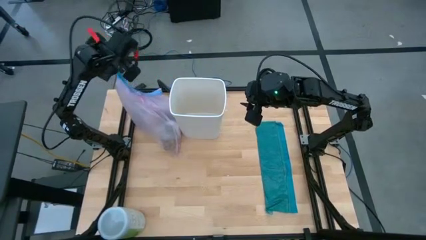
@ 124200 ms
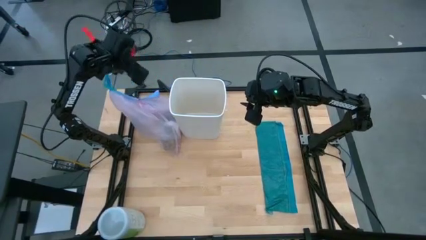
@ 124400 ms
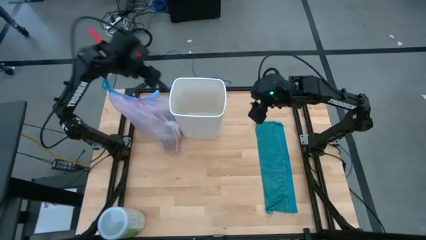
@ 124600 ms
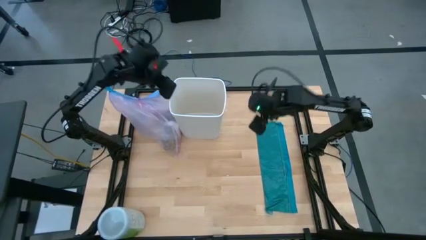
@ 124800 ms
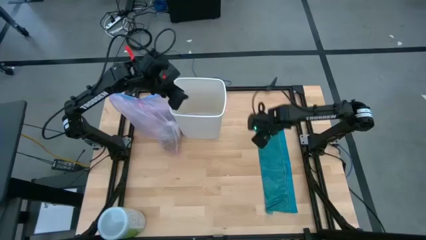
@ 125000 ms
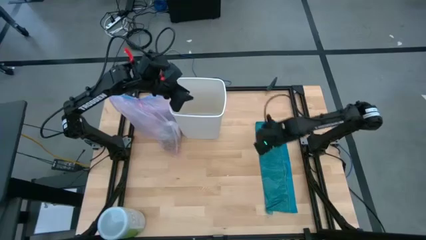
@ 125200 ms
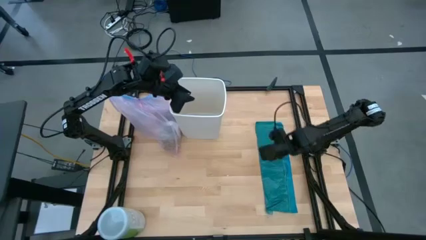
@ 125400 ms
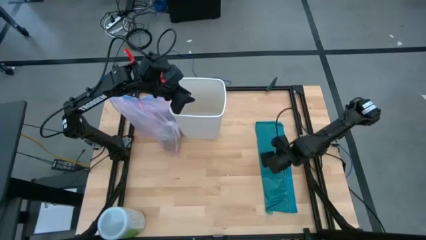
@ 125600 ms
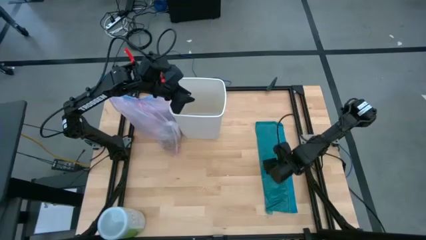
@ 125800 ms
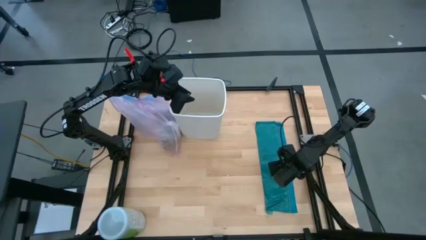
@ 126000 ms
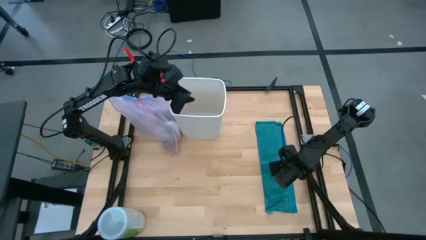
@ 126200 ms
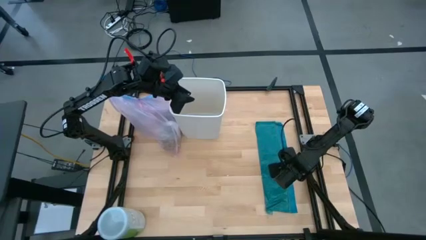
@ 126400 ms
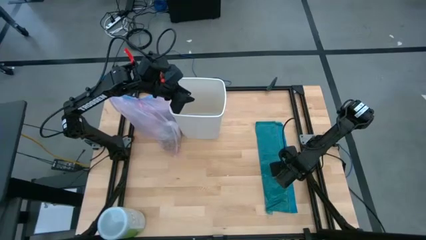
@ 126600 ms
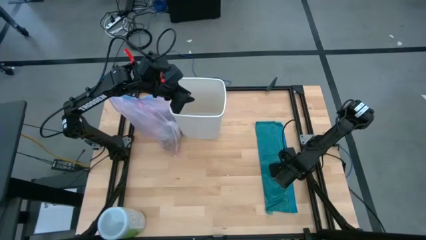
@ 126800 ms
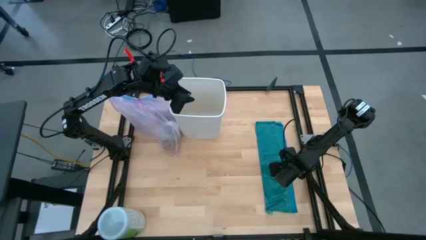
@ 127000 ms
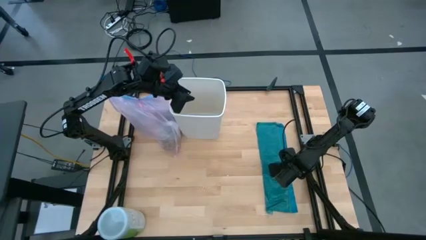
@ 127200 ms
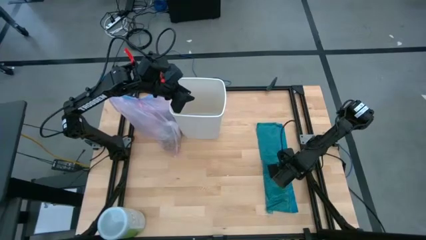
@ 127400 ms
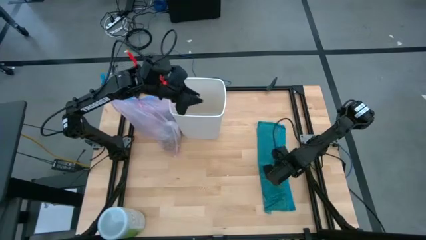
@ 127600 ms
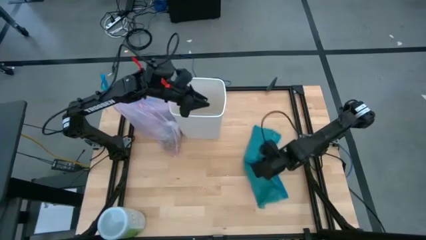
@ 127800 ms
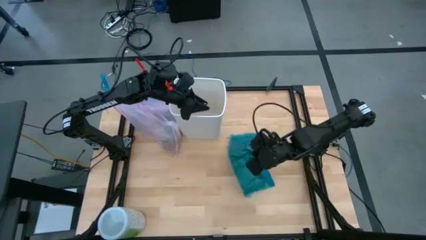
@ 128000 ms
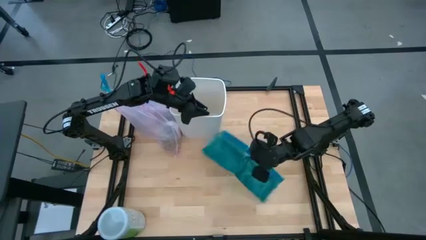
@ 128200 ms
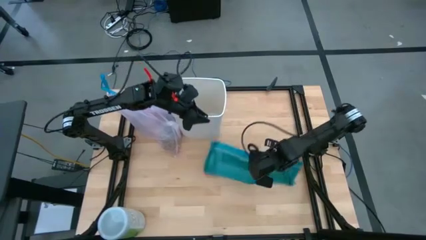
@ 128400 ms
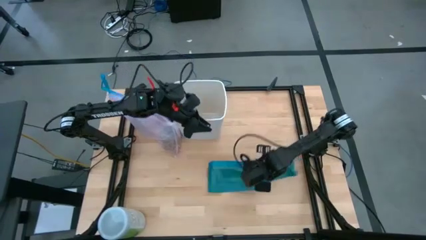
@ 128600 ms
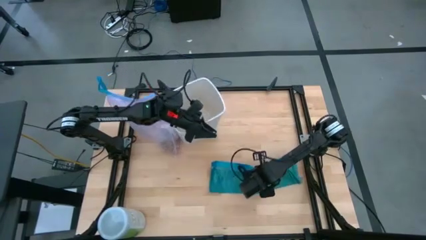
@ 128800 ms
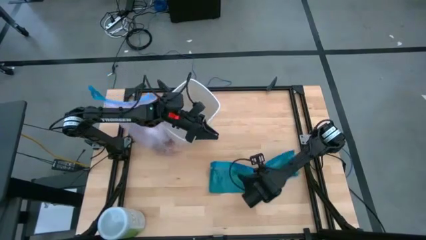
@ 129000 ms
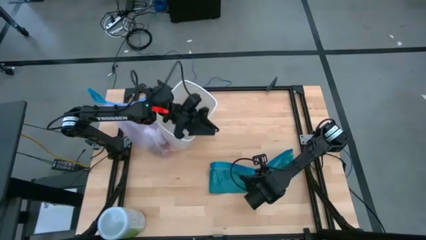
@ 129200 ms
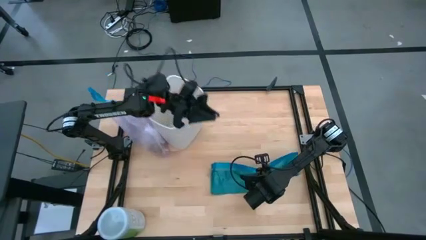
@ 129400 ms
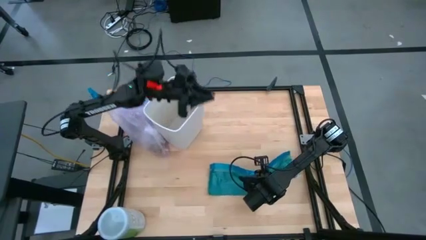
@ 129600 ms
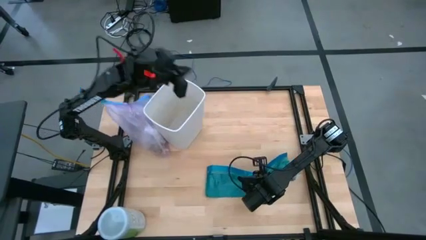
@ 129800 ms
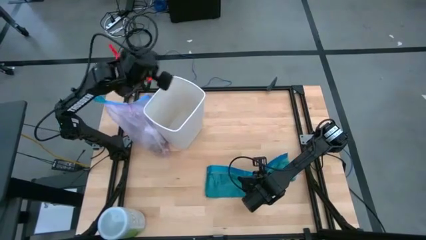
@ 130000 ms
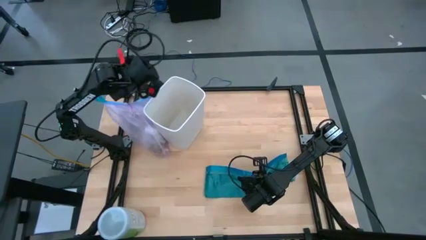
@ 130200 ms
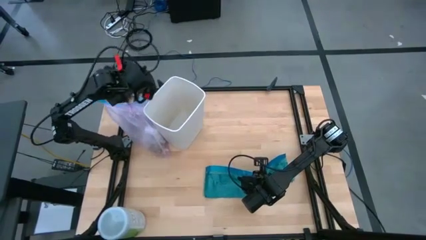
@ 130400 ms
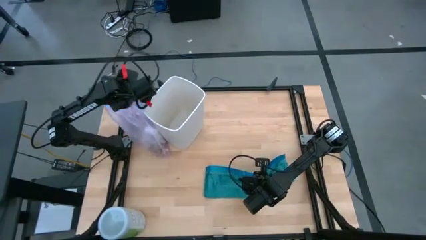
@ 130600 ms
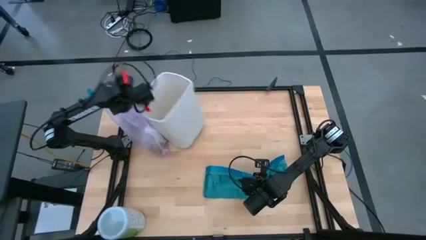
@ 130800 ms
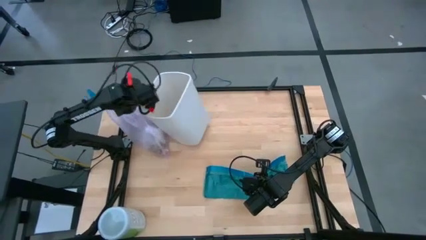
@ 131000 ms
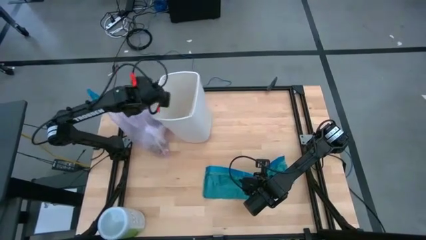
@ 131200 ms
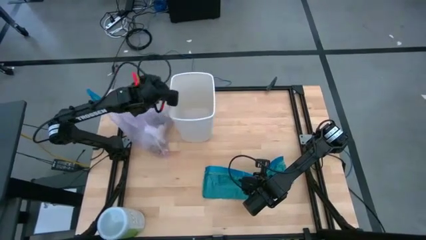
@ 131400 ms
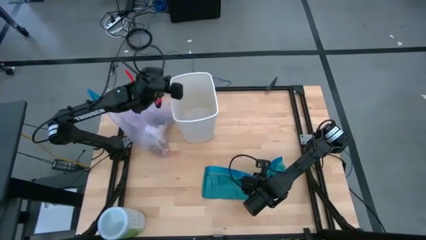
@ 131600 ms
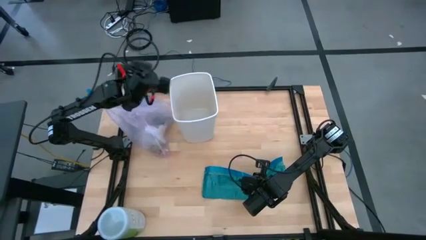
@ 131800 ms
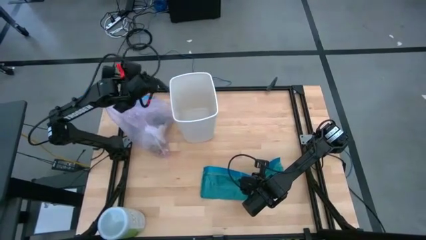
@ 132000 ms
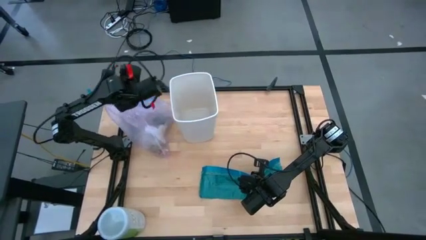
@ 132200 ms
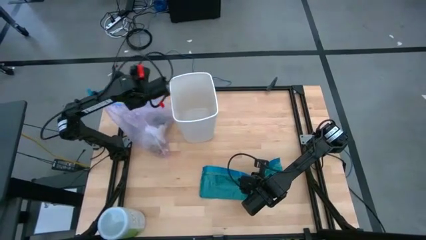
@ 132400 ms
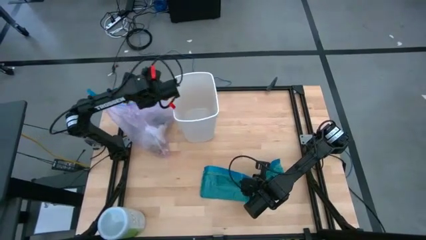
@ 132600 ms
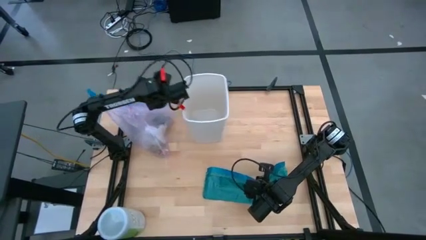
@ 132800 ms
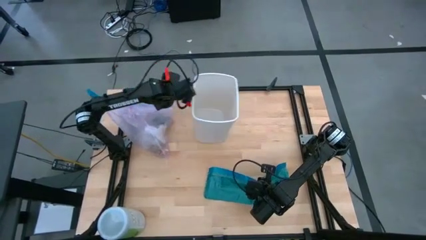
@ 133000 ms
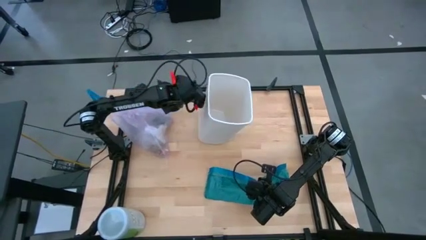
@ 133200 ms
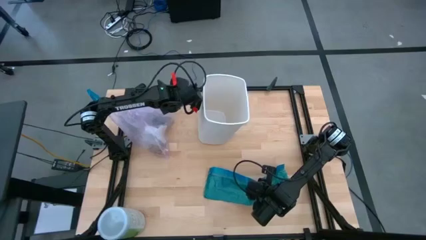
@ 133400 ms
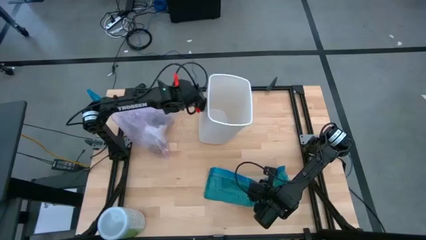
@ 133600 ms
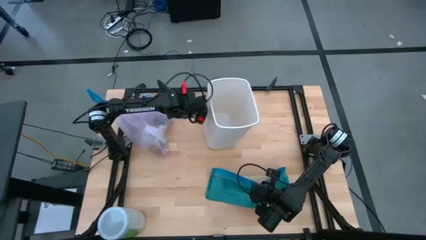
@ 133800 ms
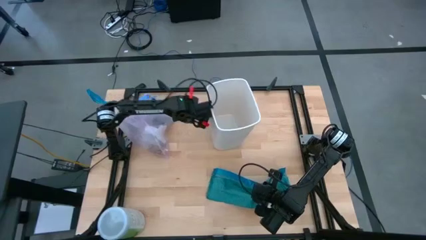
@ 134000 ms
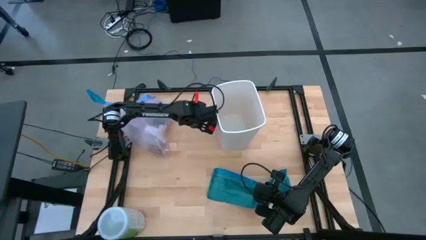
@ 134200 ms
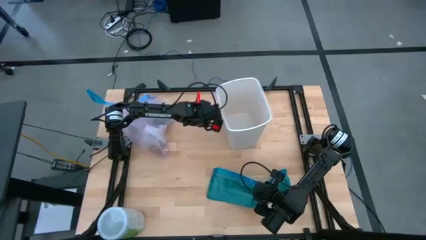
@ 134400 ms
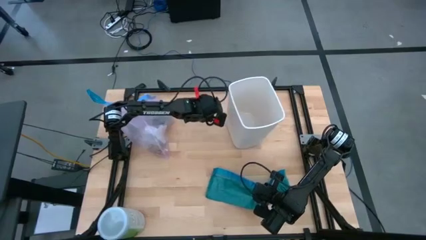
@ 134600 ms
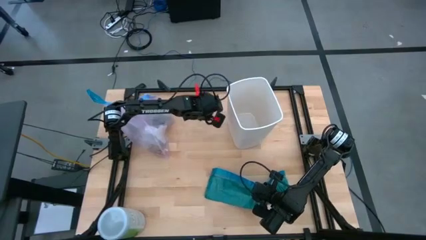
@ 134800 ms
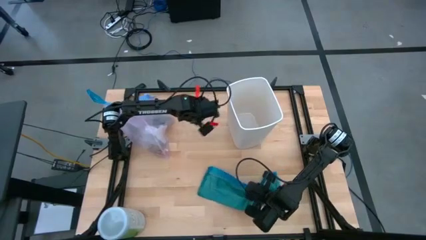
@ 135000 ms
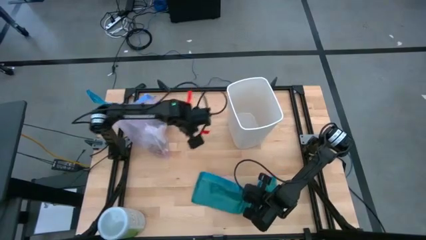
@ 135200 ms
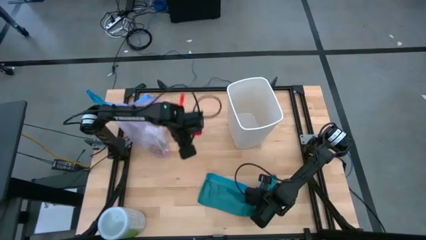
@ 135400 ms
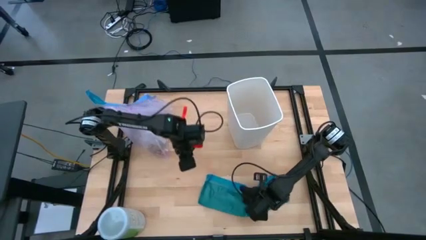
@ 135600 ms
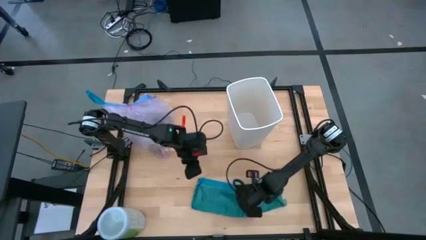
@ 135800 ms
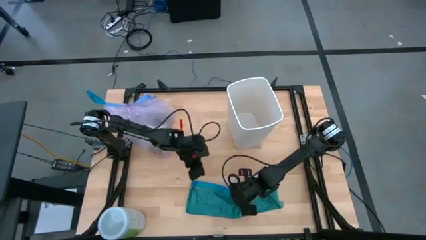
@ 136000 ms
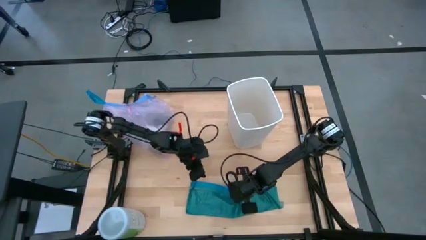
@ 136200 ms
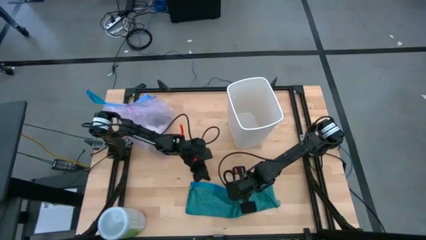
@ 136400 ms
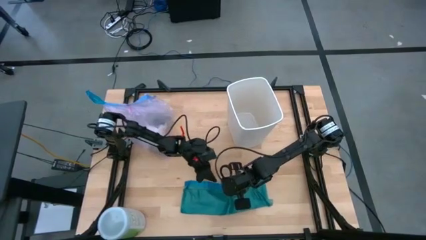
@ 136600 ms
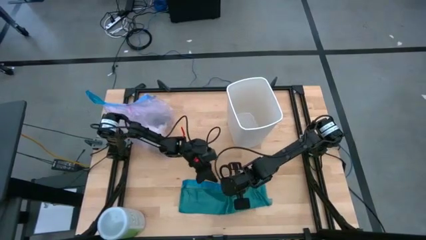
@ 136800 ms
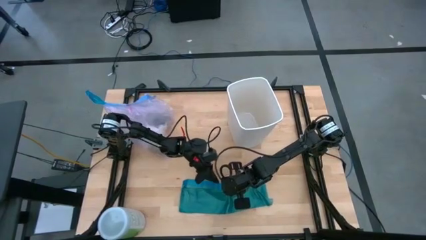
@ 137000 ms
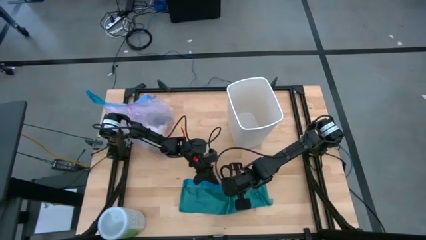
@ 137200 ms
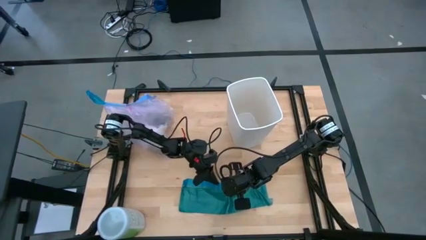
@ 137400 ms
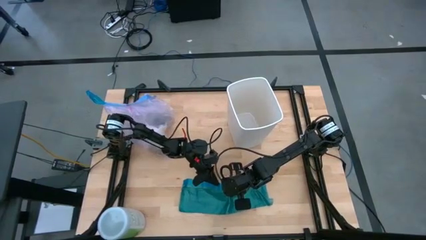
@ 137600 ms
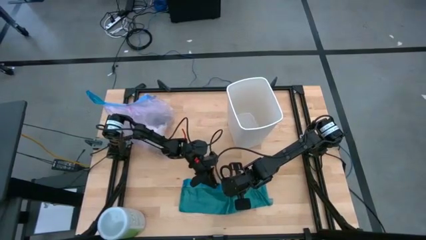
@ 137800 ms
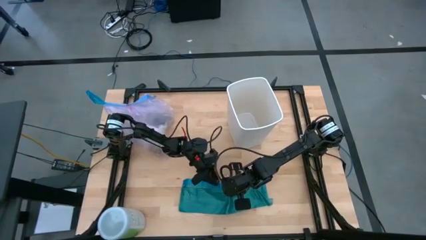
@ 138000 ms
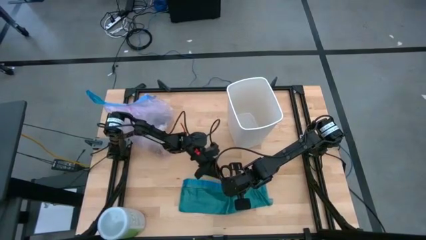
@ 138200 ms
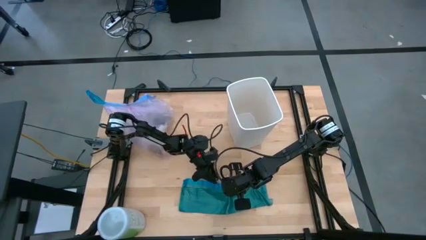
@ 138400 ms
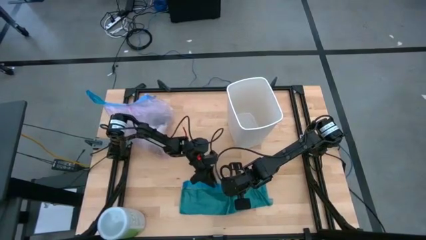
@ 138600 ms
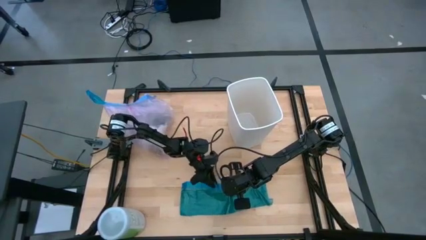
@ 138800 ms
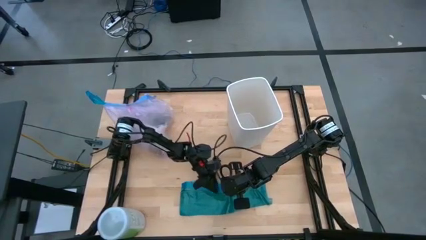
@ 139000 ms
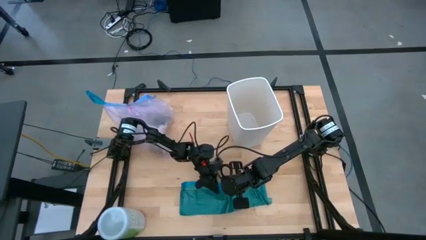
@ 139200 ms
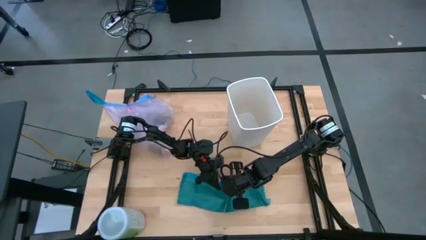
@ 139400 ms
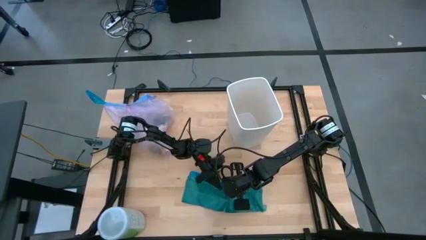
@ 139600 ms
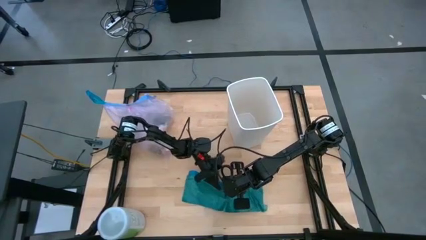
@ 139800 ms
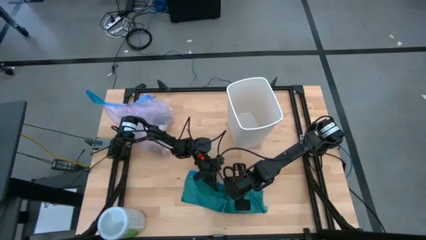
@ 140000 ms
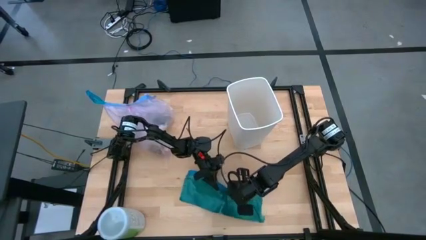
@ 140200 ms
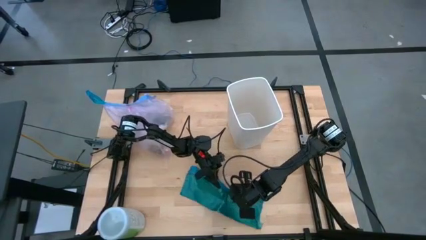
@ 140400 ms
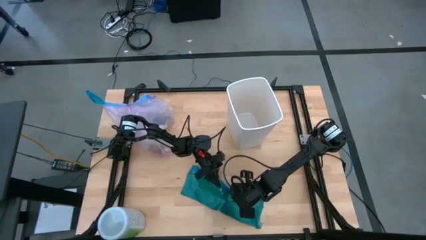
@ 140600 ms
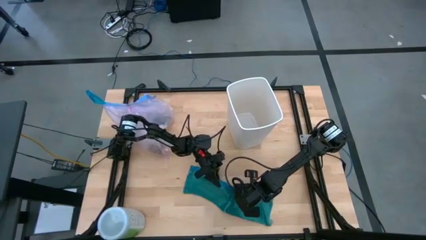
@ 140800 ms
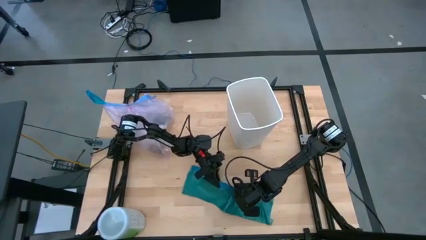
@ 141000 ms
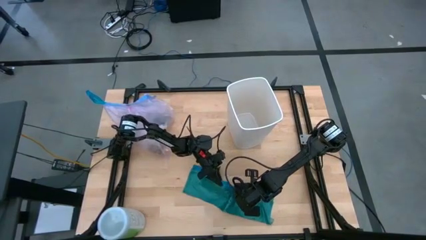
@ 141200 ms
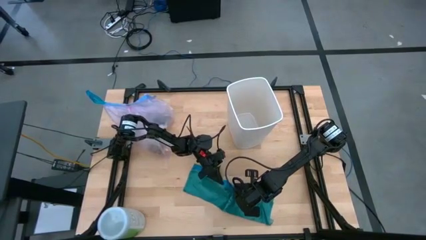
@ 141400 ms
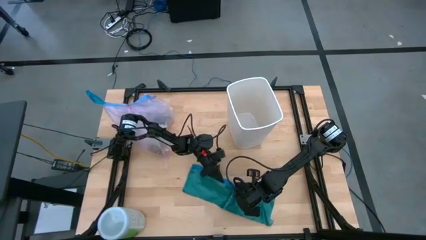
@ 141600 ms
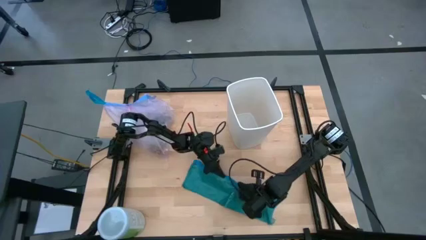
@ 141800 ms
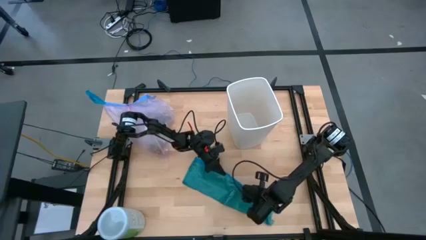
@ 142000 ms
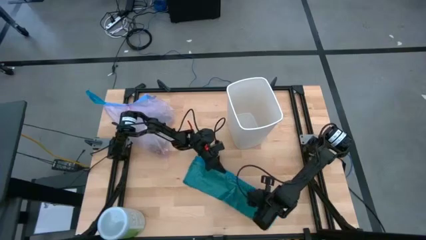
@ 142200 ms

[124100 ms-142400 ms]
Task: place trash/remove bag and relplace
Put the blue trash bag into the white trash bin
